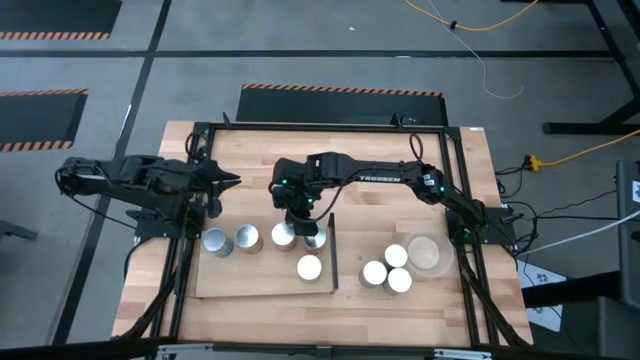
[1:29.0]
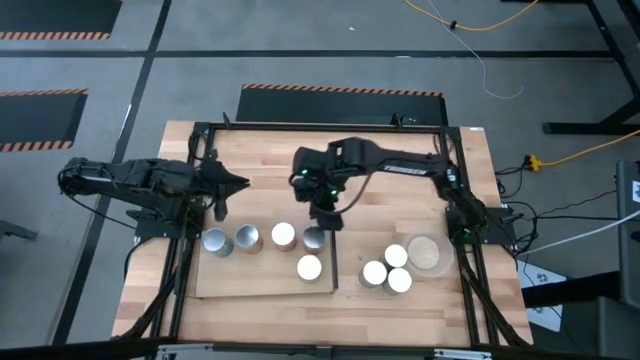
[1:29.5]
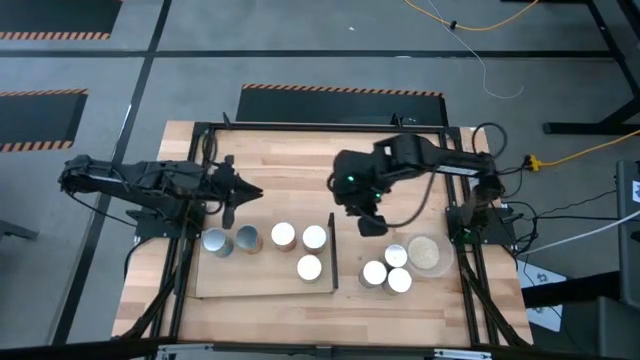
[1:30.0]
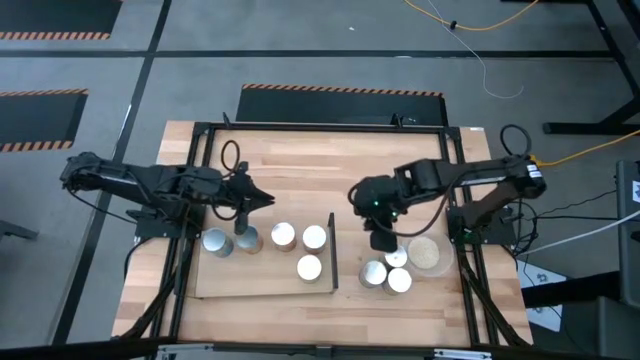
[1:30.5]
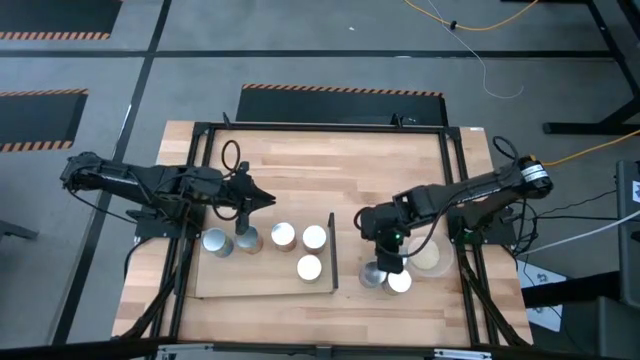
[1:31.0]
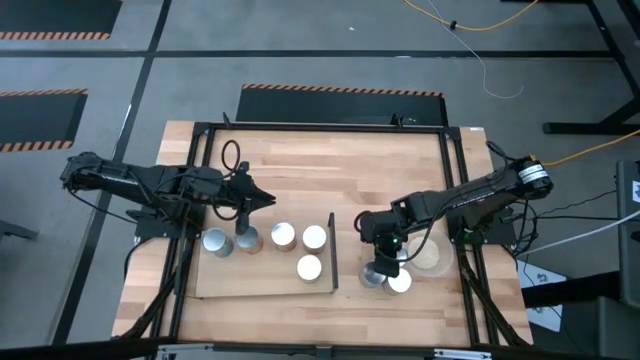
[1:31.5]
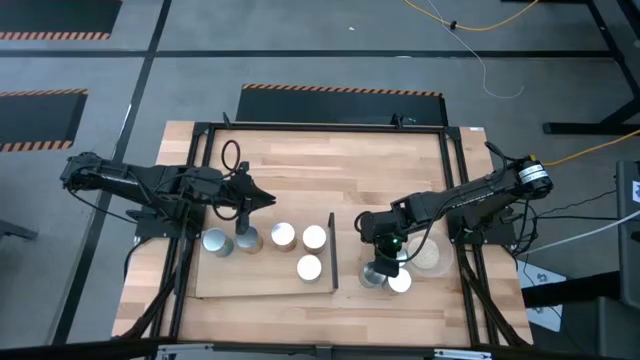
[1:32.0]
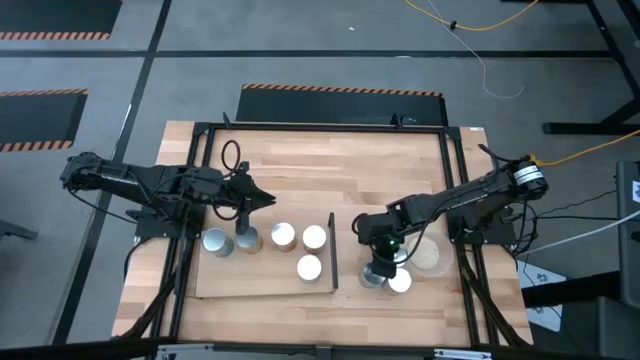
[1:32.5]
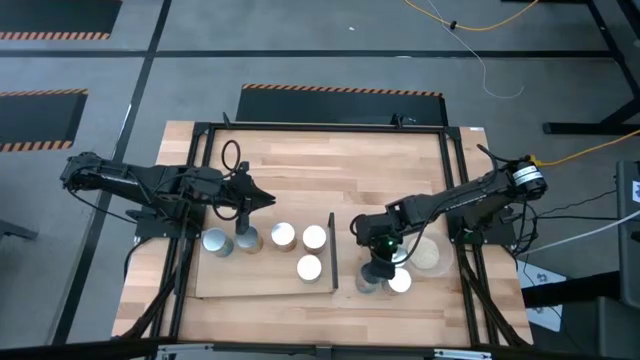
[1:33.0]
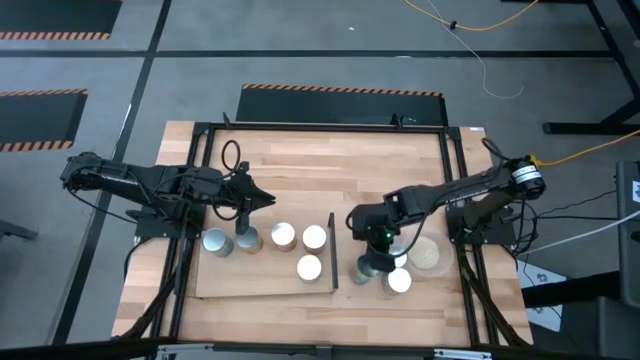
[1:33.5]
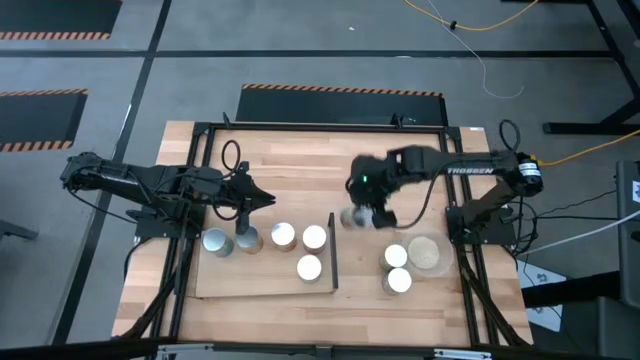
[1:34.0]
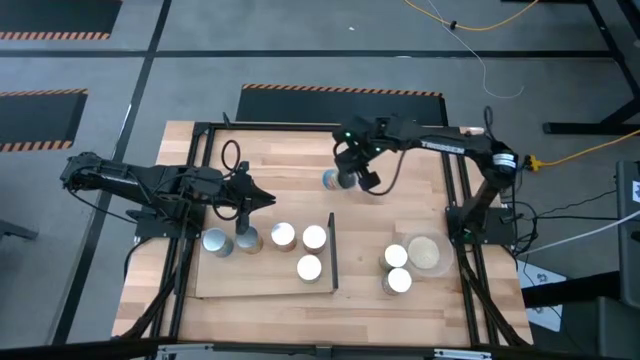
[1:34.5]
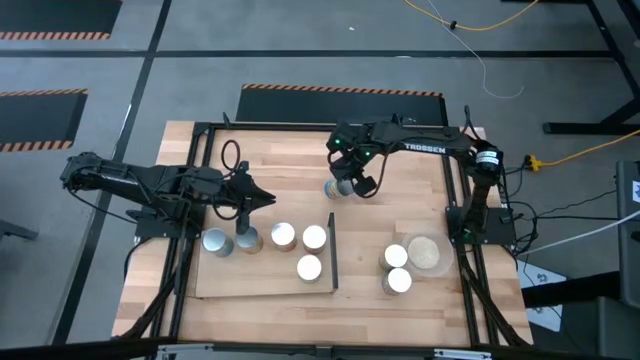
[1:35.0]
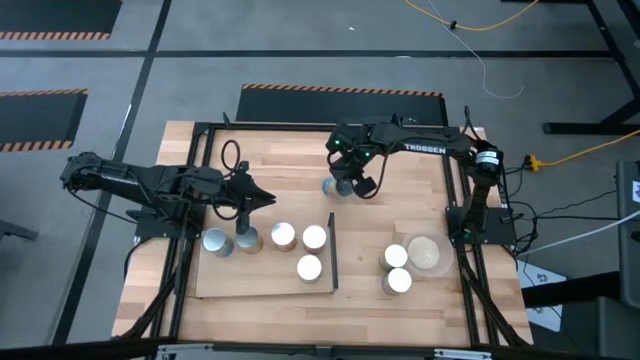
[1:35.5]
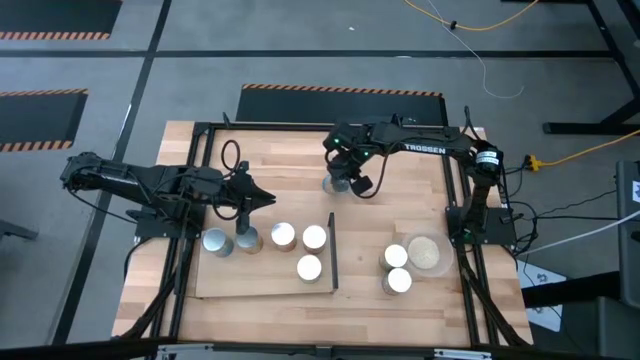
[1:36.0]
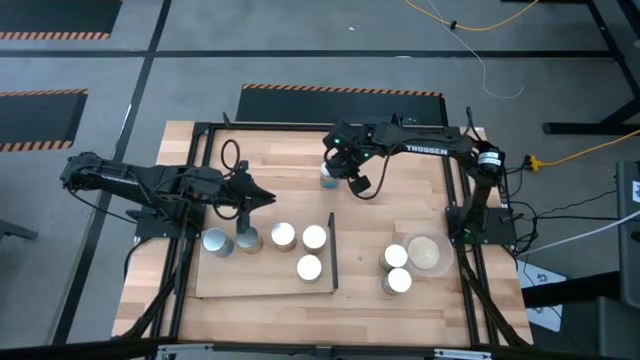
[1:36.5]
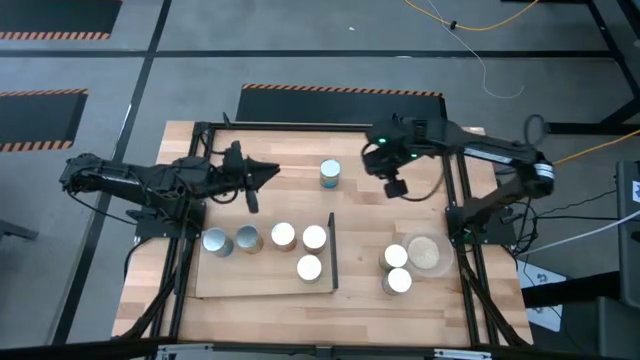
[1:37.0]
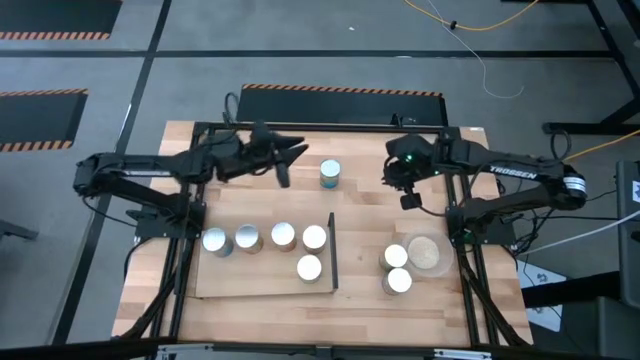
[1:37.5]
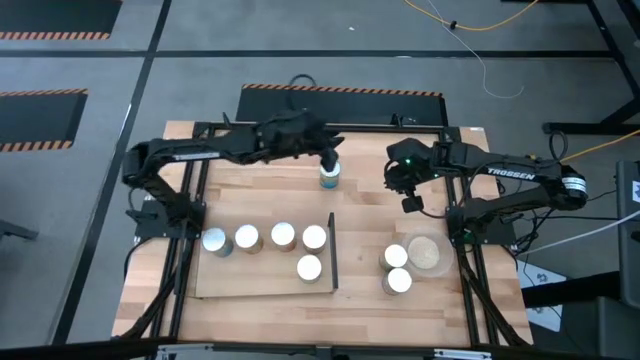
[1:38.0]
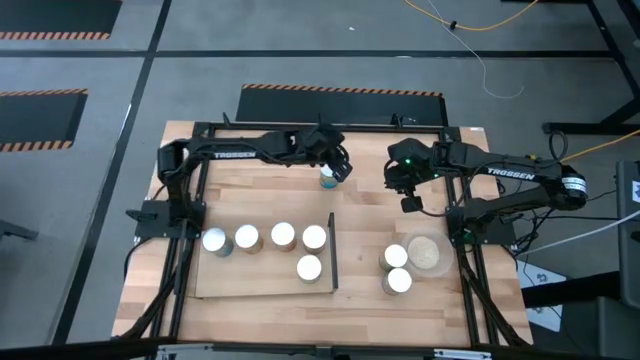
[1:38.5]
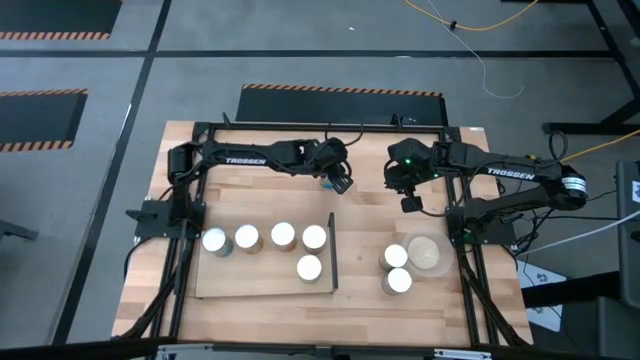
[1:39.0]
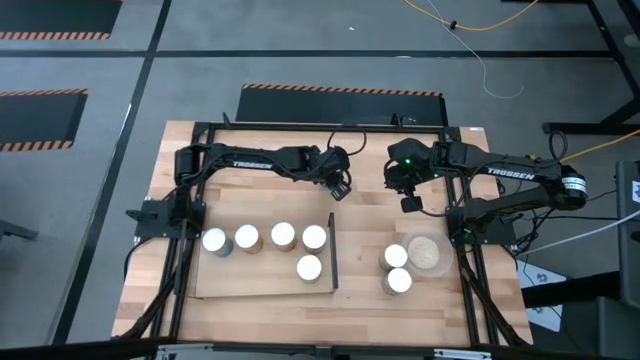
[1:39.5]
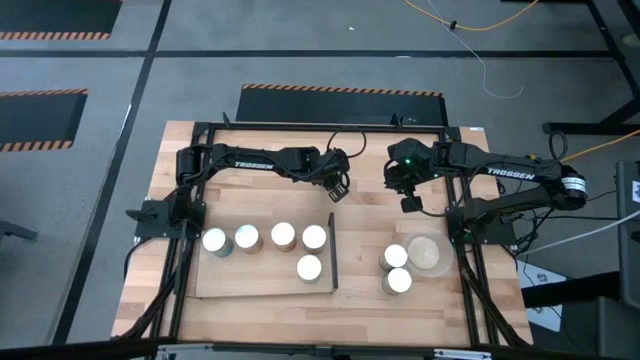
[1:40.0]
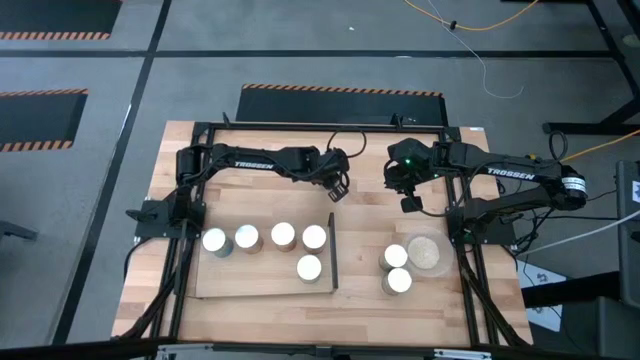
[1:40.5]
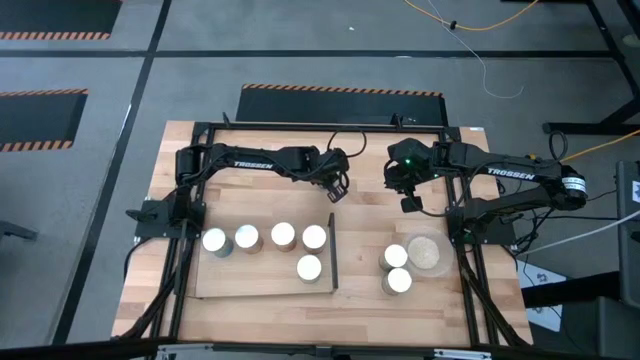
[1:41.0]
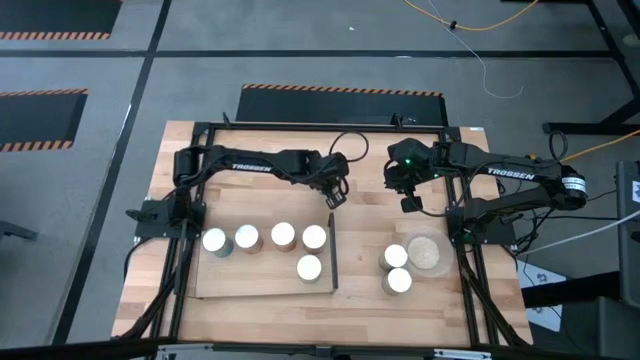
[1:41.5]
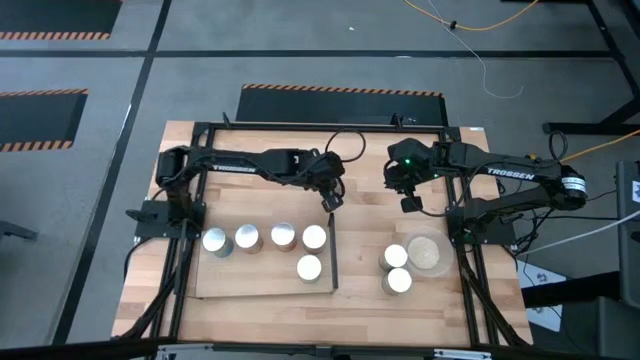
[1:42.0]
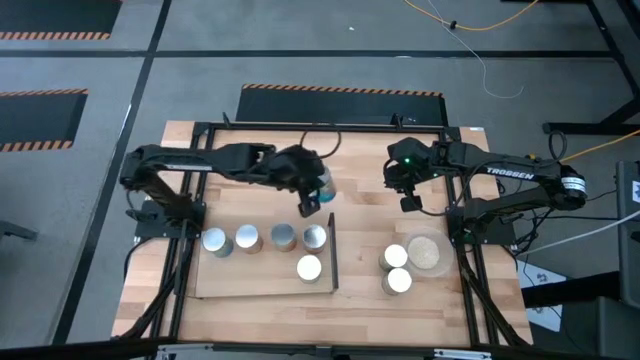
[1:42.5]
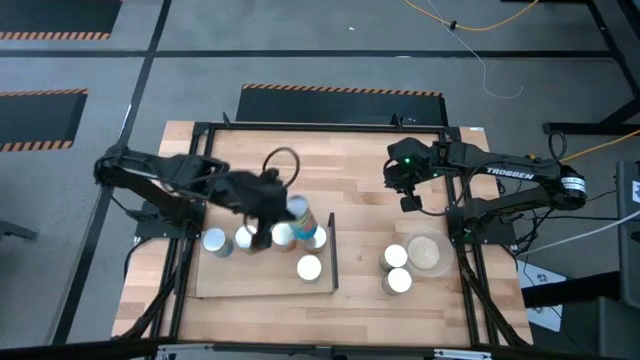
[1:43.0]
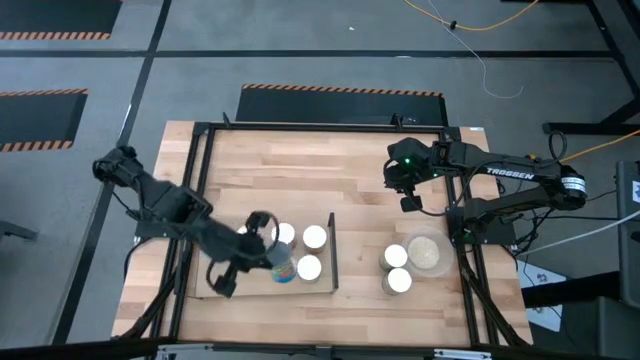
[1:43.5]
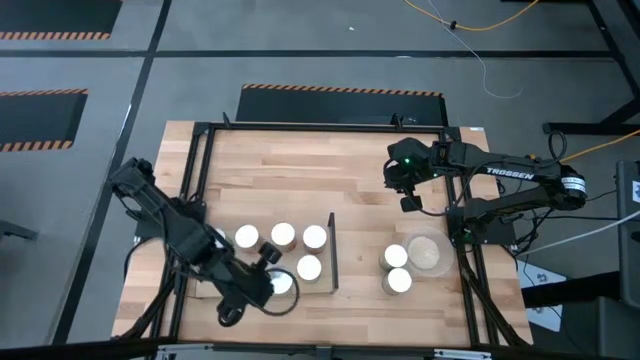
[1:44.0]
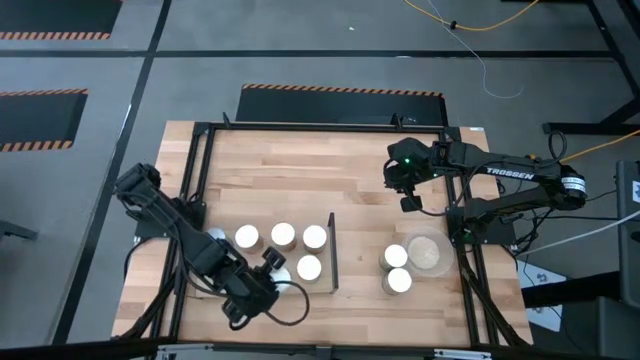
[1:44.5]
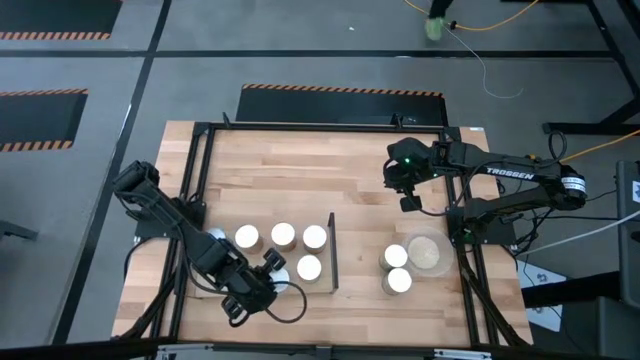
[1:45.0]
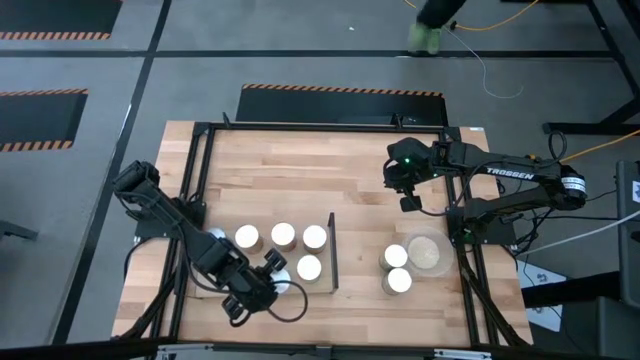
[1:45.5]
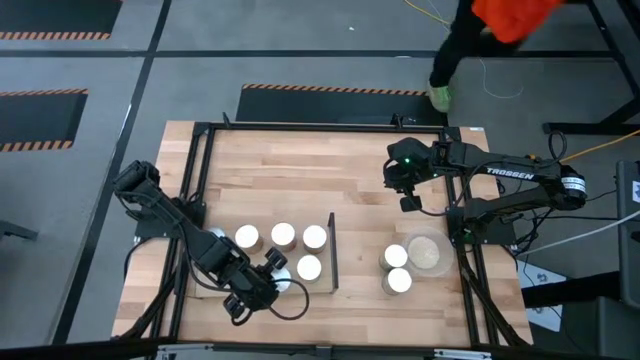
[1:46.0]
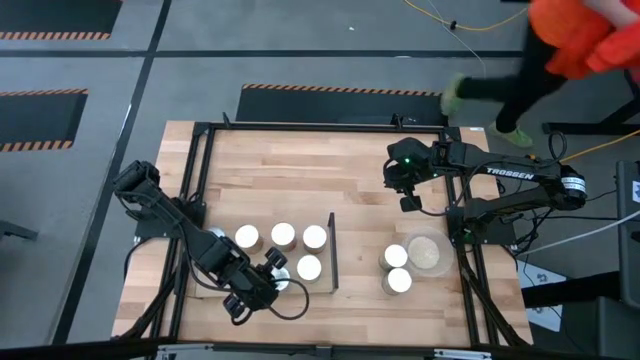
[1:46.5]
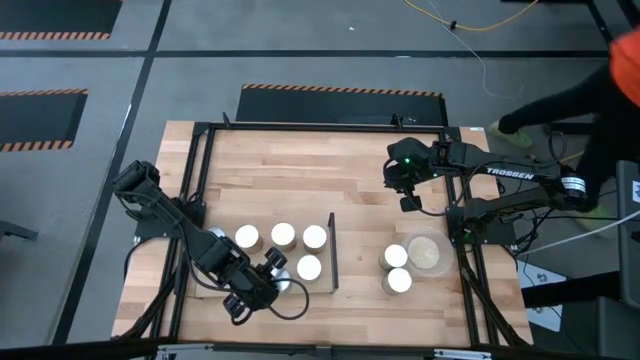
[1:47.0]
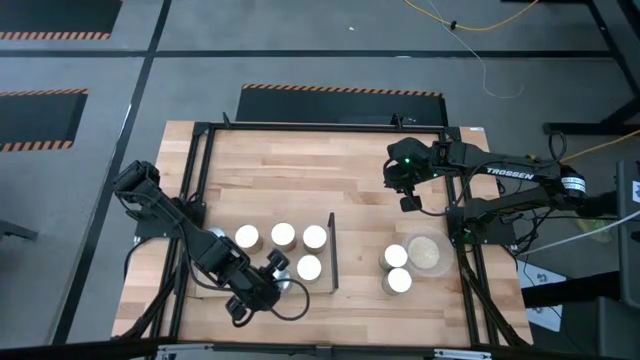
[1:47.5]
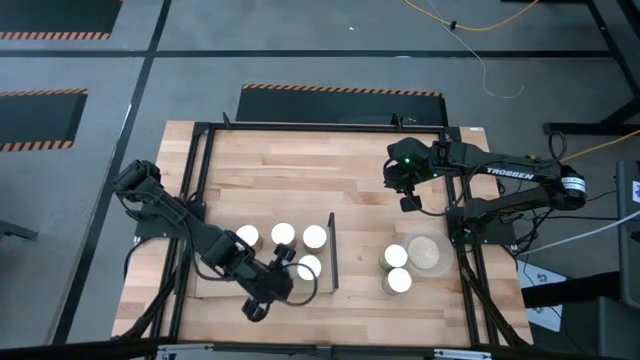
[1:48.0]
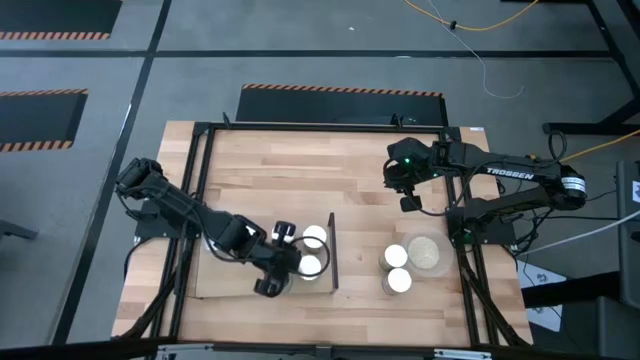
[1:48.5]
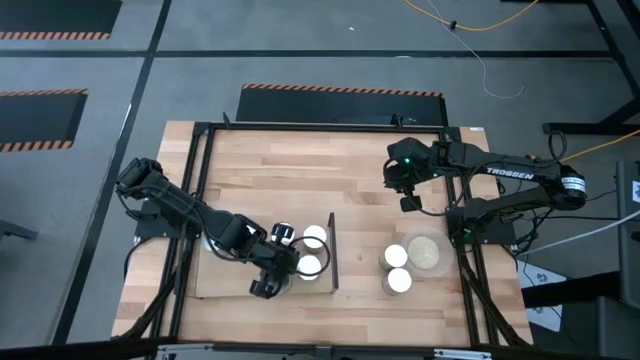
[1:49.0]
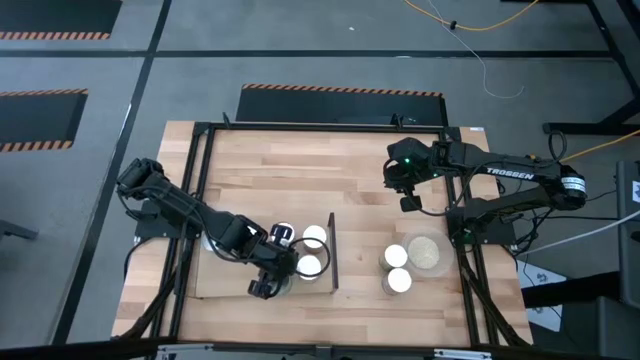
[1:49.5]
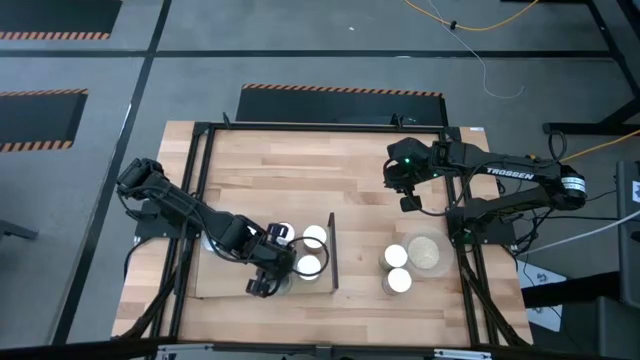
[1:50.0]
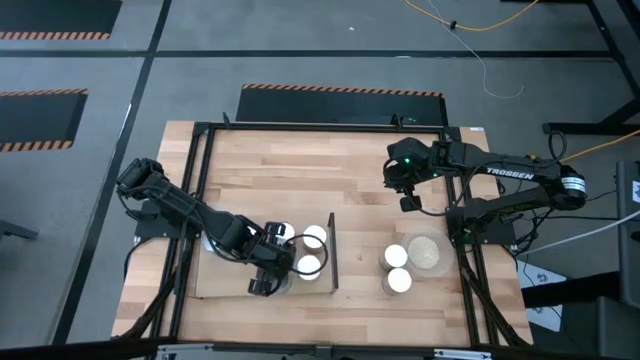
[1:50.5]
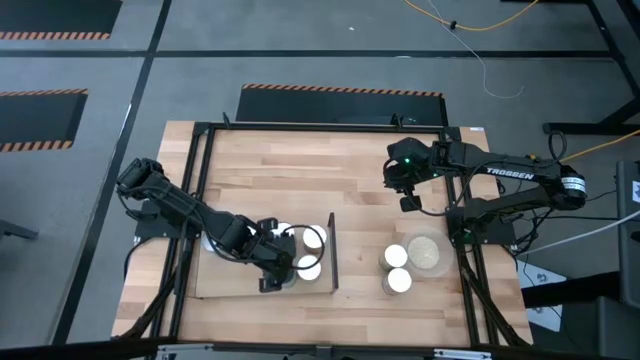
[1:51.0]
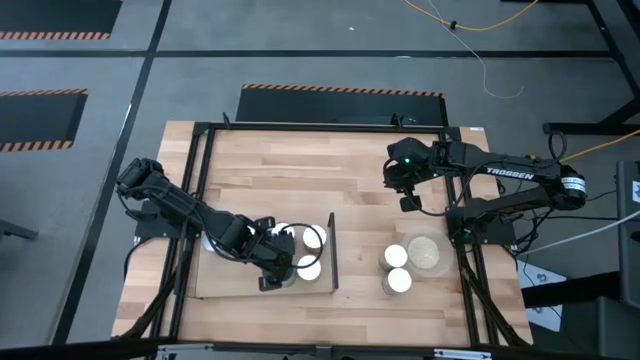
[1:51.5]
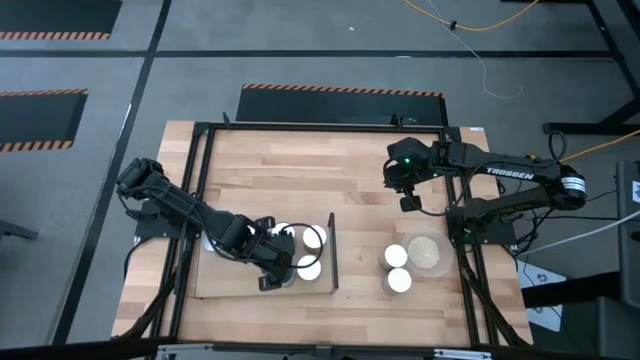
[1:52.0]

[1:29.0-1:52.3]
Task: Pick and place cans onto a shelf
Put the tomato can on the shelf
